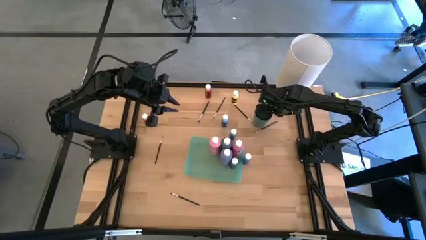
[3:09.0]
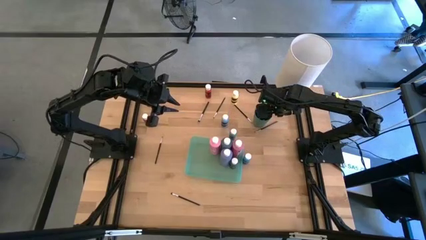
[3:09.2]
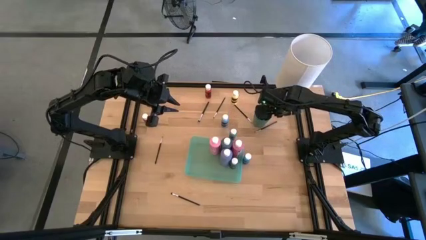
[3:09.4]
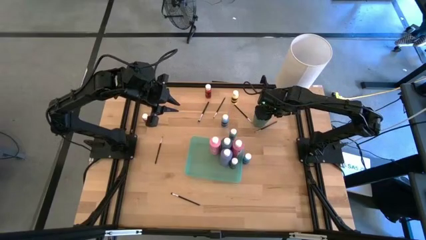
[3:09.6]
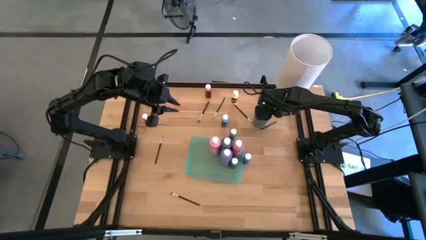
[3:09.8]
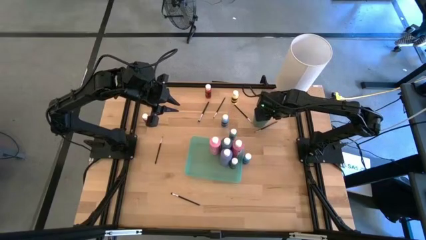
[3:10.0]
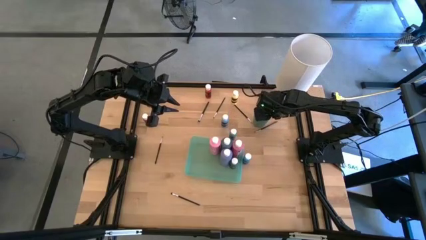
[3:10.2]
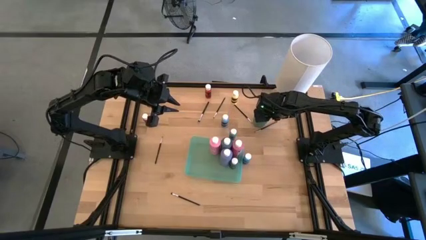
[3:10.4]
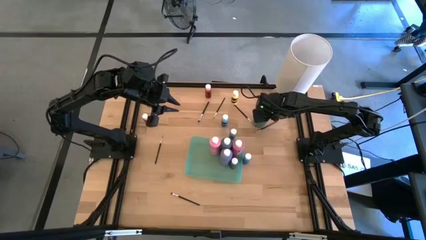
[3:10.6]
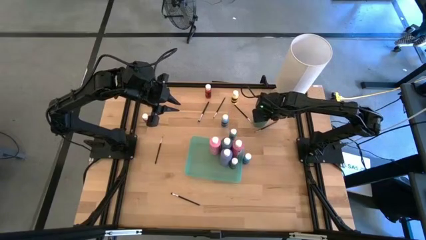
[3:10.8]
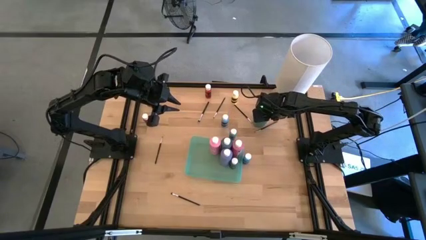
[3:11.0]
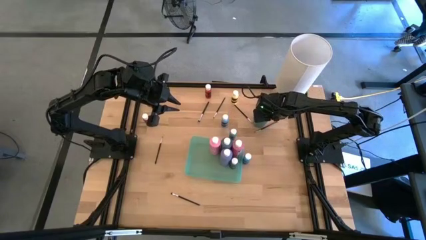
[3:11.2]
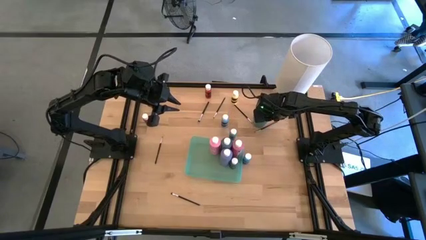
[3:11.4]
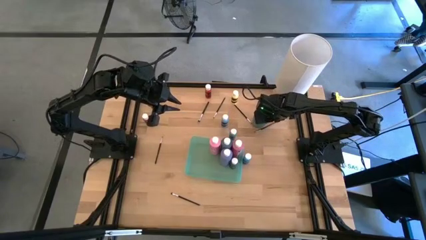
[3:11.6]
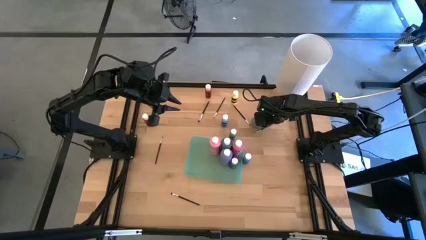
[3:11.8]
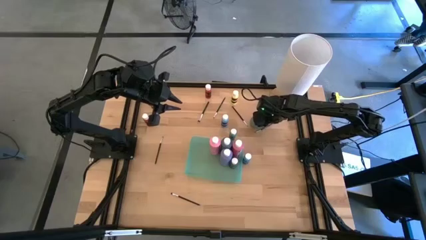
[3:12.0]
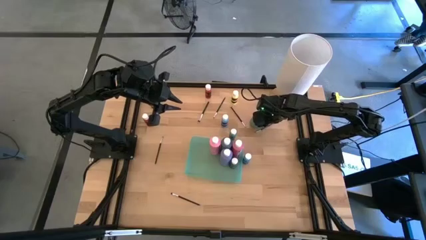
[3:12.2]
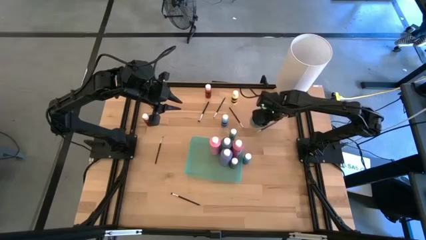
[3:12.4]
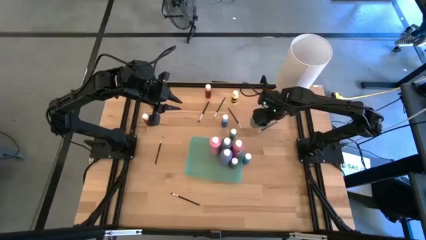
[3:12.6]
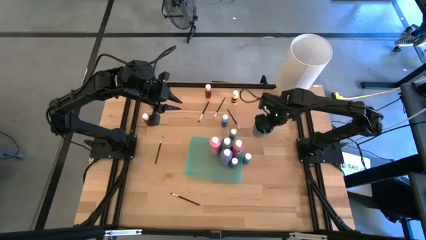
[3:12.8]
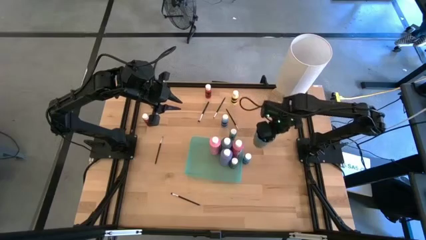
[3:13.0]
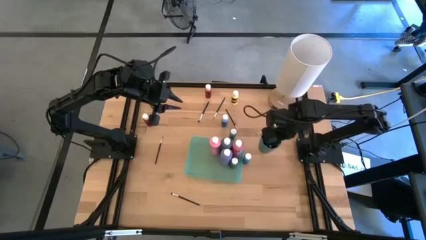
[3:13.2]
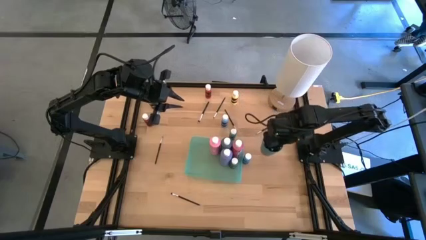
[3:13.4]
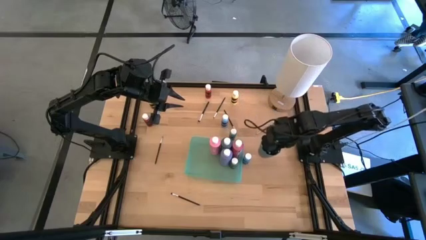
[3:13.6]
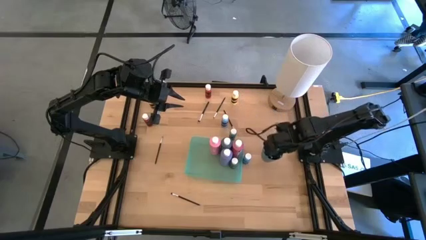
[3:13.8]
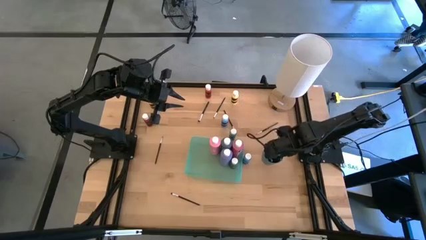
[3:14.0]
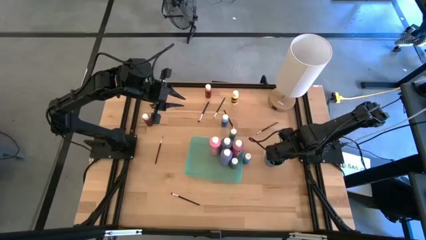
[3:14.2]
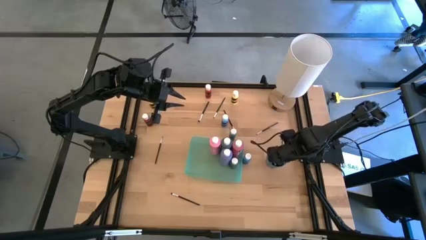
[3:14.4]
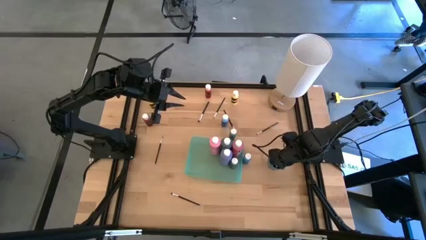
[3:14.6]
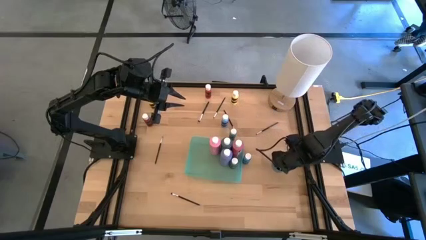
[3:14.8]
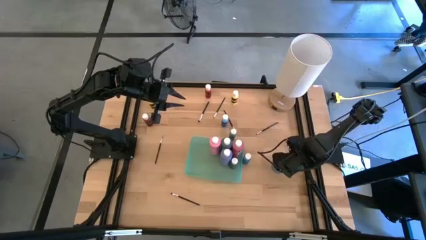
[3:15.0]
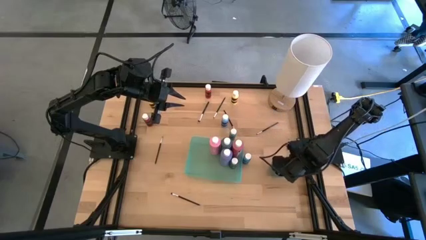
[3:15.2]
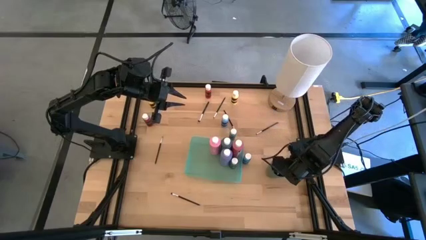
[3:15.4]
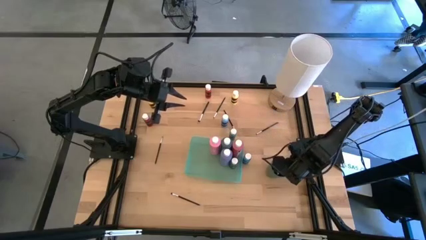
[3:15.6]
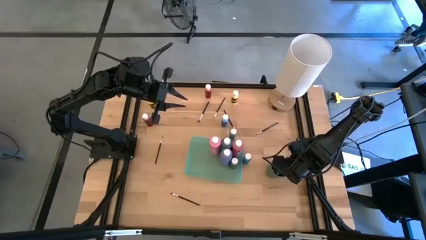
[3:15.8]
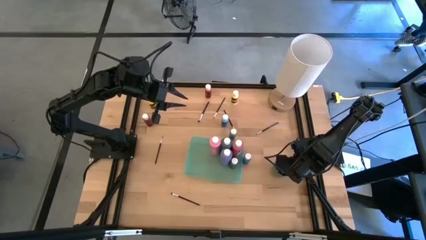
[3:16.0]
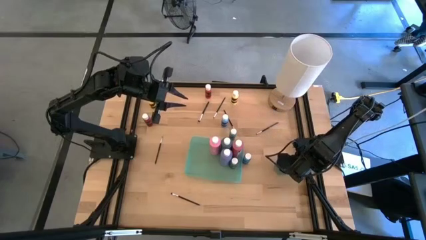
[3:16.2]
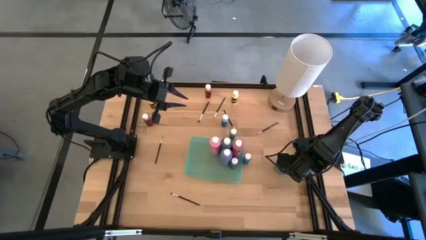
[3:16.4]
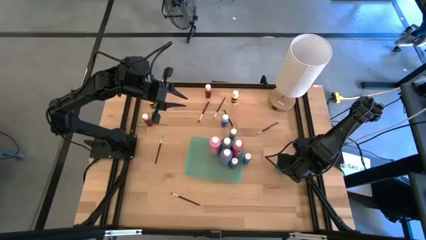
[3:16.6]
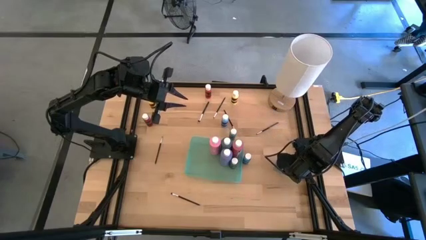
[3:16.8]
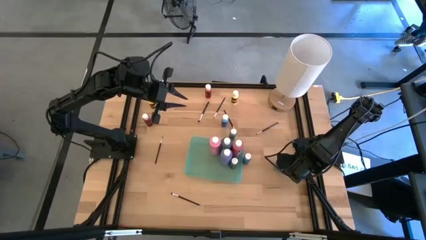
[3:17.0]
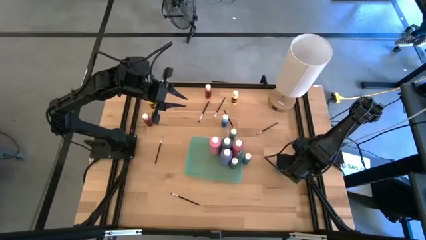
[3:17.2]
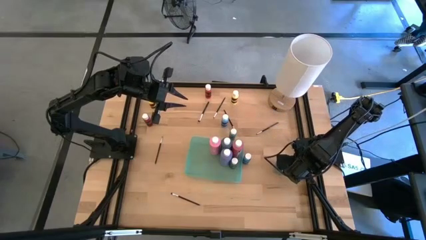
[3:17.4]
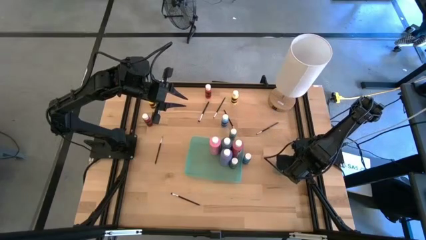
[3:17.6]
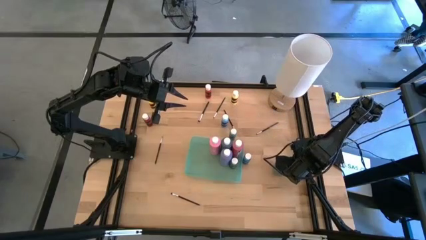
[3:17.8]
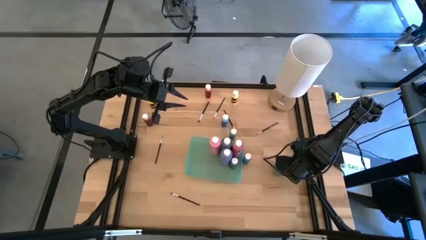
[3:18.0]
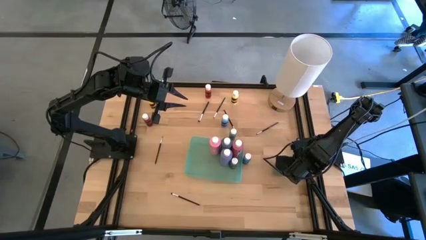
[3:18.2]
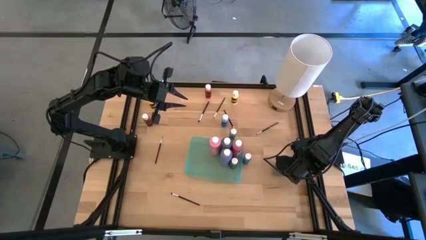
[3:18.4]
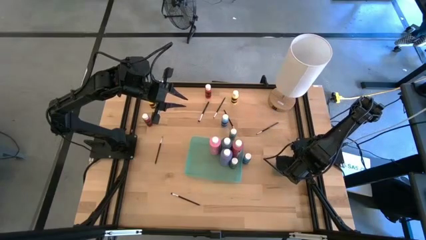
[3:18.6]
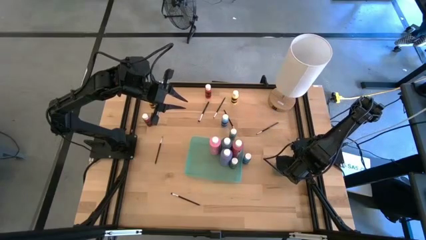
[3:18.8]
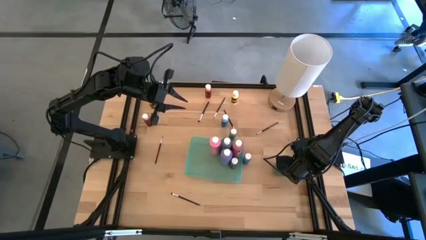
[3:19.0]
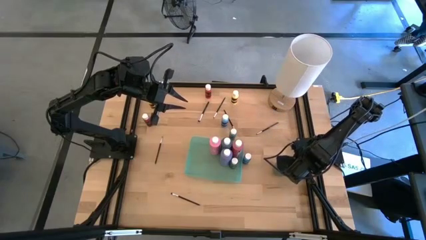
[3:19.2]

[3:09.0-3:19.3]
Task: Pick & Place Paint Supplies
Move the green cup to the middle right of the table

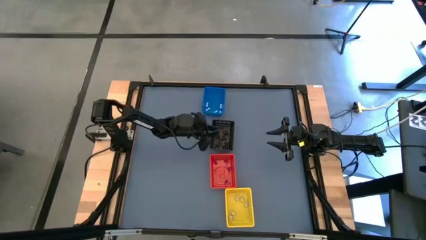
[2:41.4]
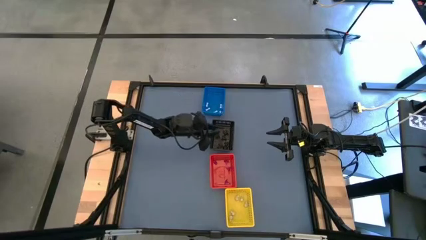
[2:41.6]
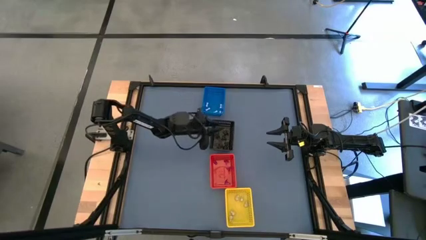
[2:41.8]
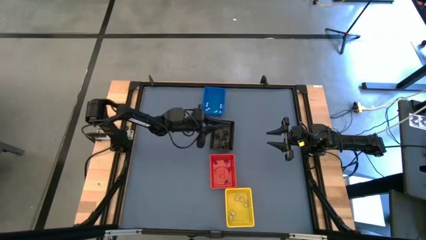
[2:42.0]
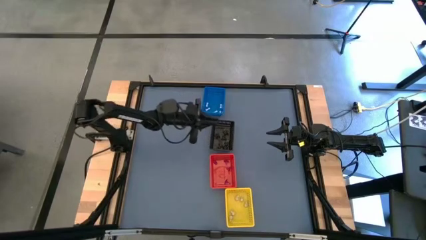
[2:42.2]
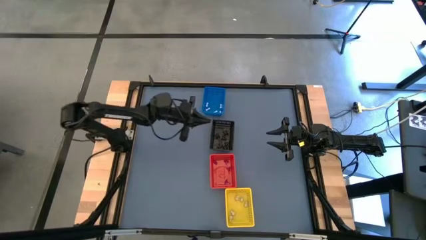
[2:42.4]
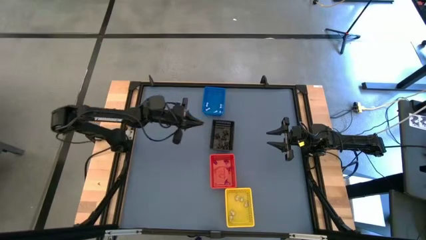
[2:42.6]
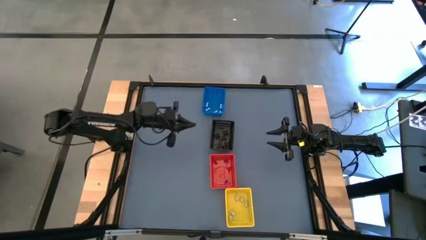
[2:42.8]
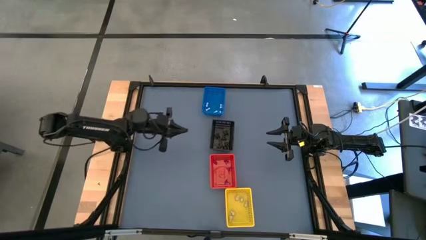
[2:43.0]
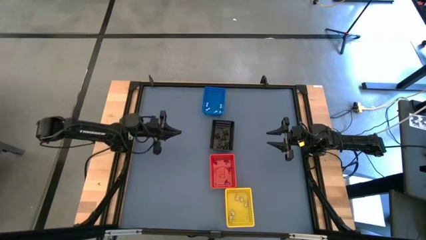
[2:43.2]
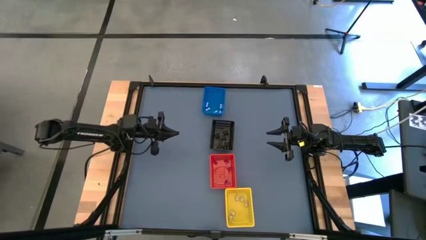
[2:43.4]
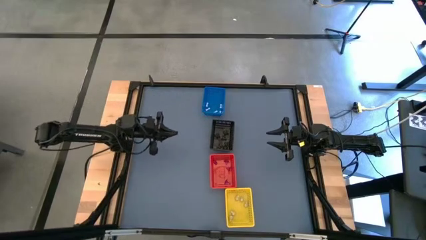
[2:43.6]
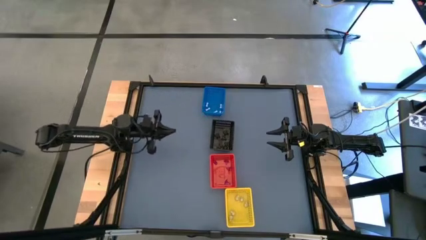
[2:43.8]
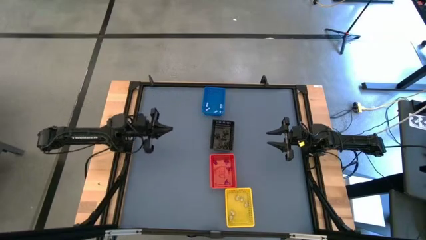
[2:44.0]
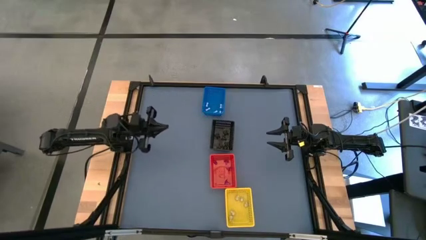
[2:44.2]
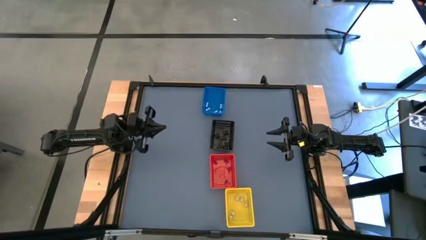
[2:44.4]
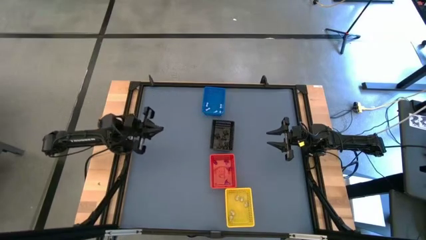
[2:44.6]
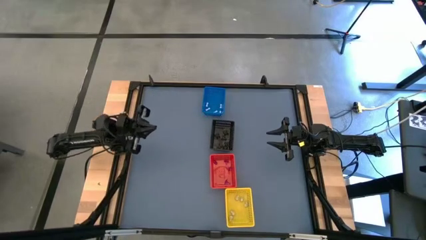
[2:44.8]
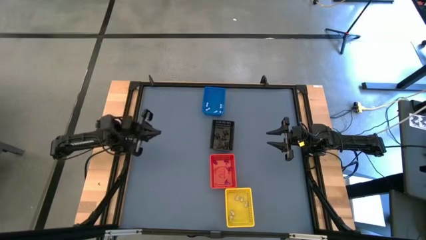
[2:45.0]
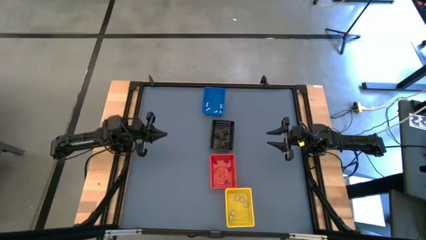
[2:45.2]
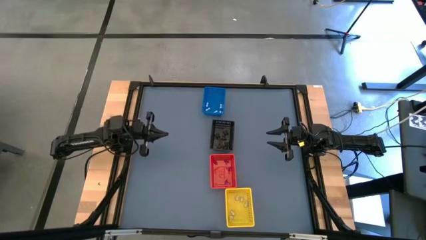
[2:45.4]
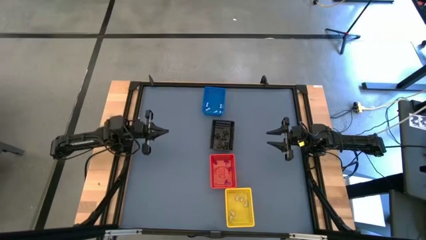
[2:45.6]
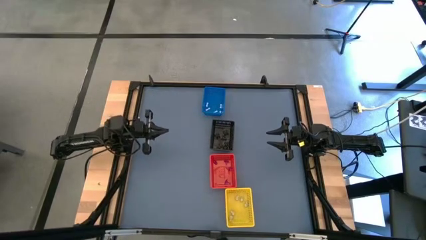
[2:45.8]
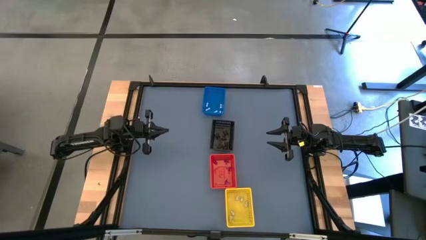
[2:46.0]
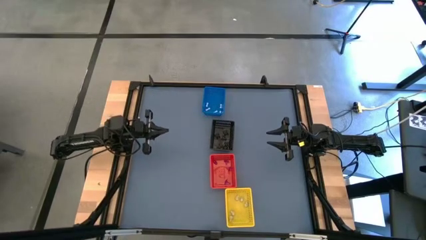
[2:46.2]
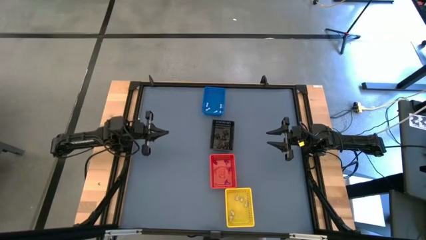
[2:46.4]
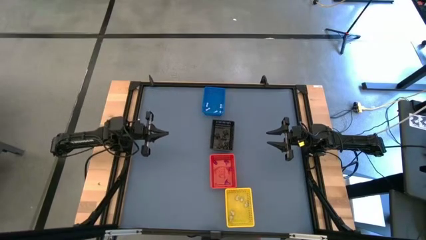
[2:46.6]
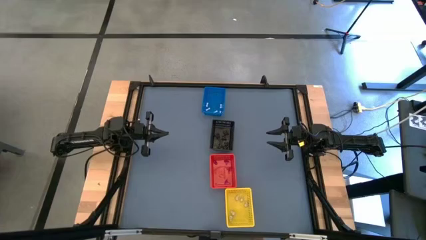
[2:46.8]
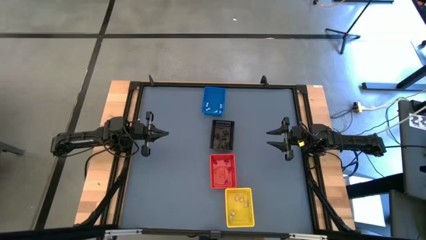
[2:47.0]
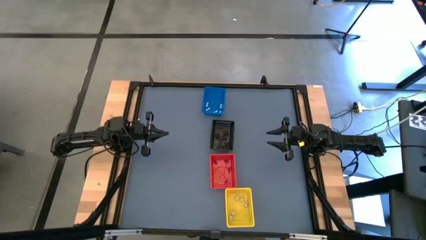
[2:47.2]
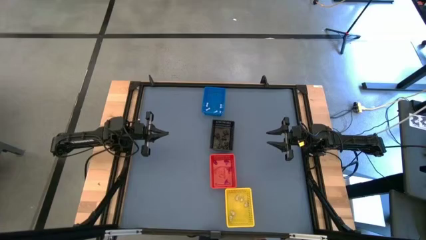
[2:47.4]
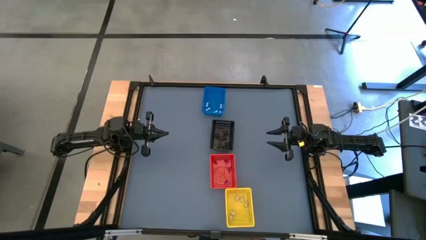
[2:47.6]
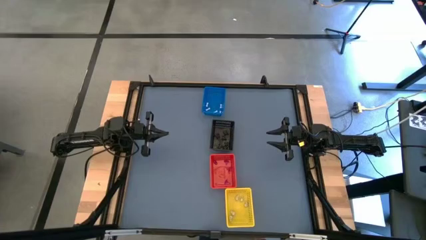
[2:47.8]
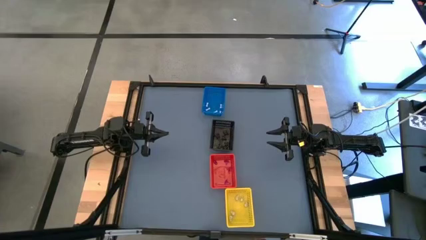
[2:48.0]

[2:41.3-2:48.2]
Task: Sort Halloween decoration
Return to Home Position
